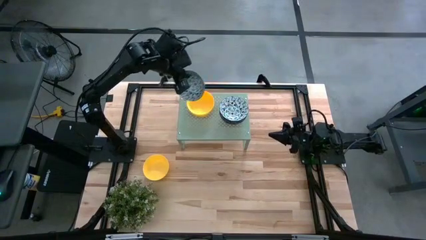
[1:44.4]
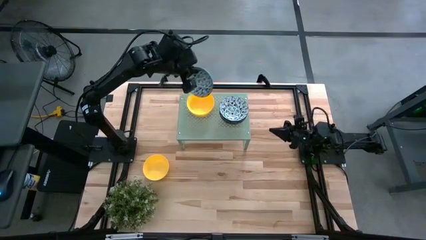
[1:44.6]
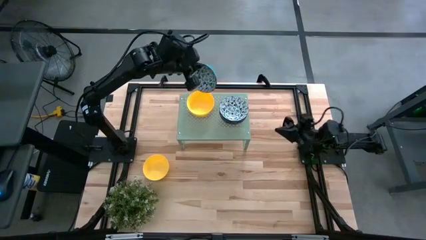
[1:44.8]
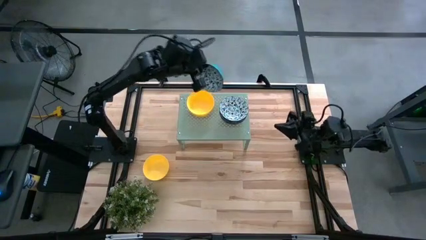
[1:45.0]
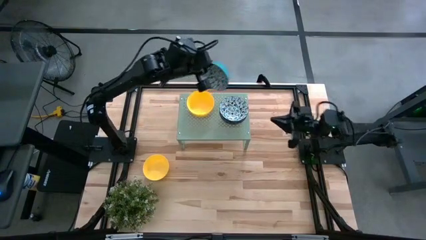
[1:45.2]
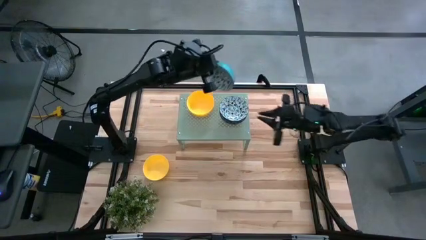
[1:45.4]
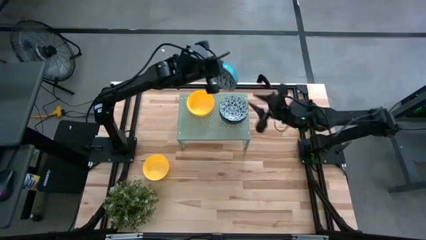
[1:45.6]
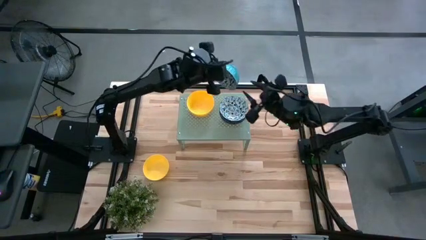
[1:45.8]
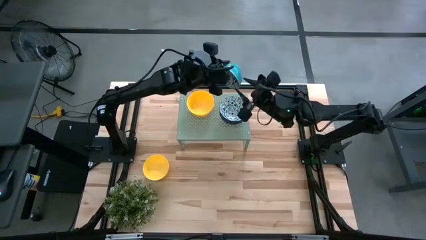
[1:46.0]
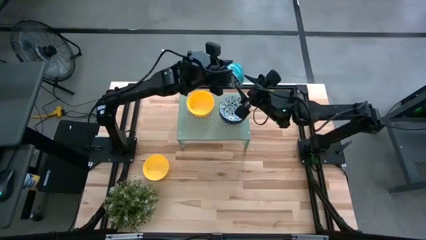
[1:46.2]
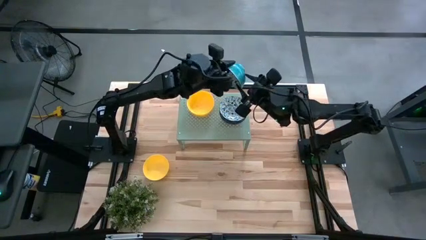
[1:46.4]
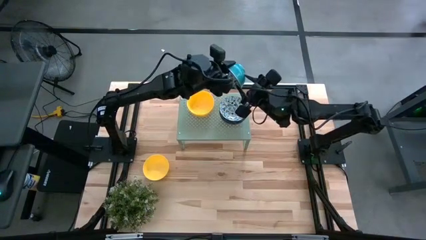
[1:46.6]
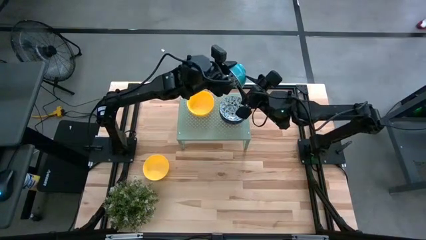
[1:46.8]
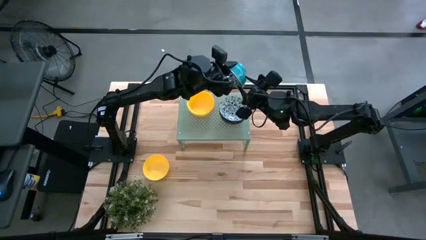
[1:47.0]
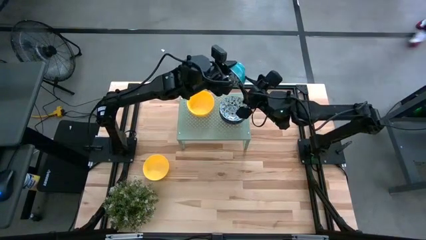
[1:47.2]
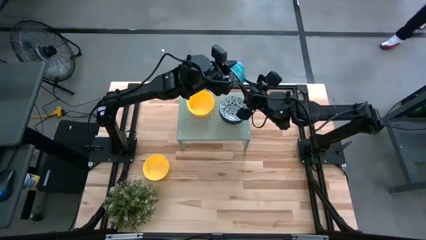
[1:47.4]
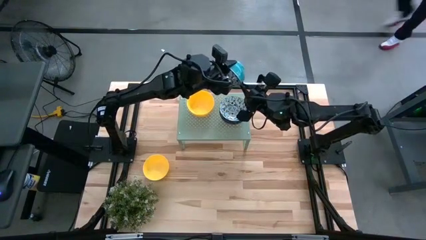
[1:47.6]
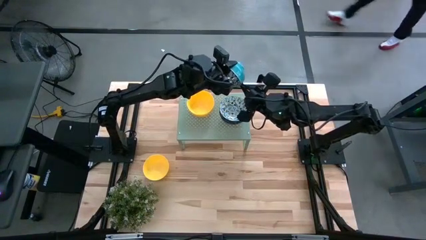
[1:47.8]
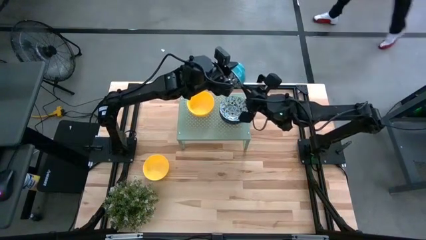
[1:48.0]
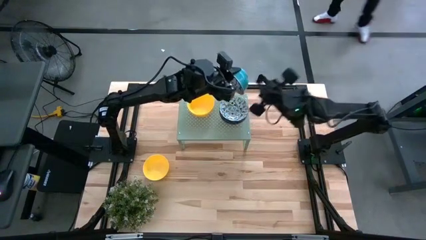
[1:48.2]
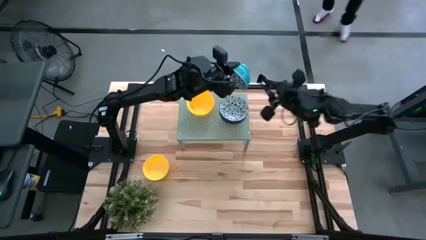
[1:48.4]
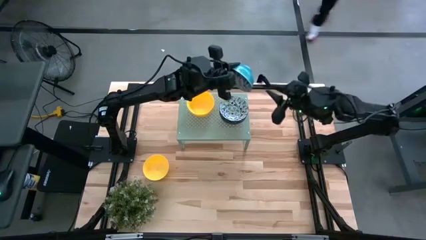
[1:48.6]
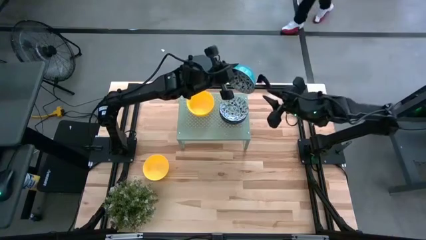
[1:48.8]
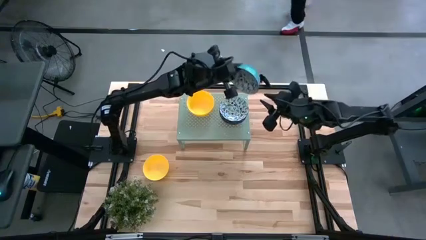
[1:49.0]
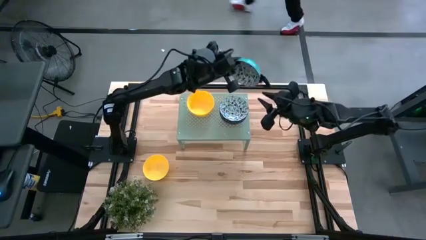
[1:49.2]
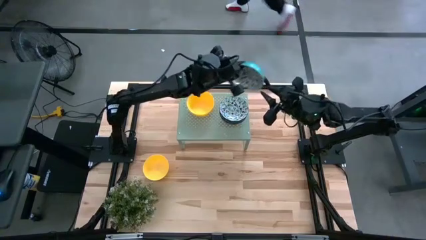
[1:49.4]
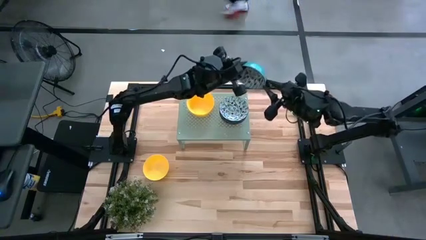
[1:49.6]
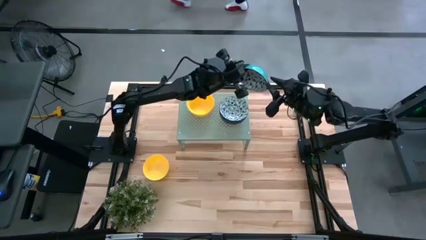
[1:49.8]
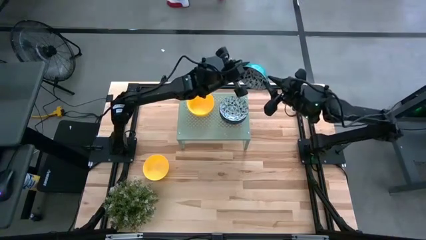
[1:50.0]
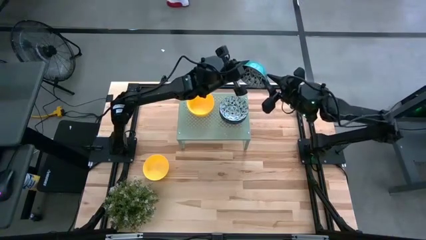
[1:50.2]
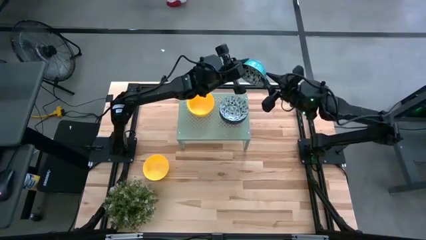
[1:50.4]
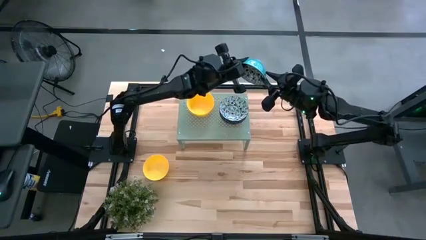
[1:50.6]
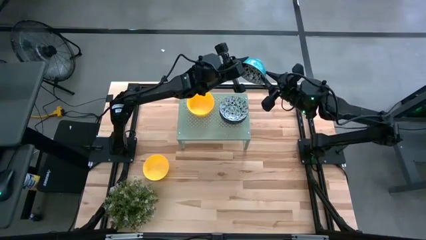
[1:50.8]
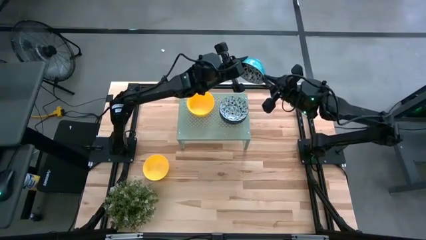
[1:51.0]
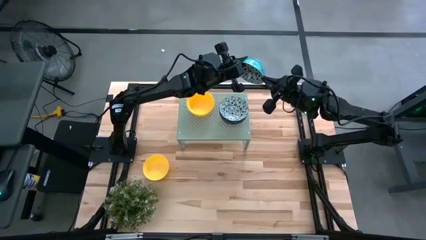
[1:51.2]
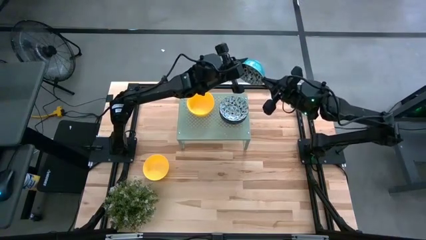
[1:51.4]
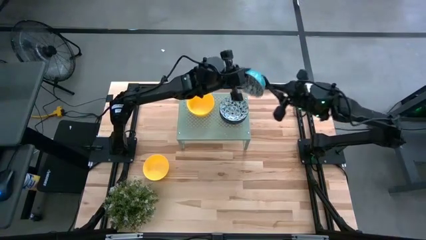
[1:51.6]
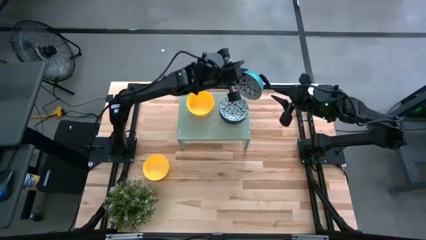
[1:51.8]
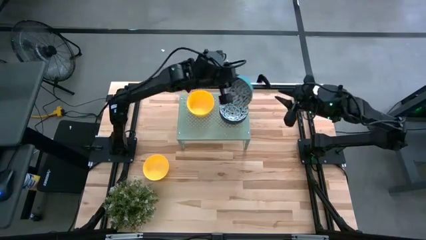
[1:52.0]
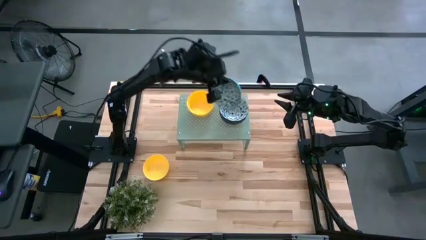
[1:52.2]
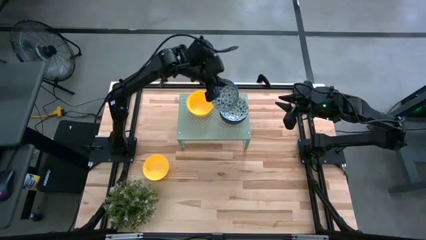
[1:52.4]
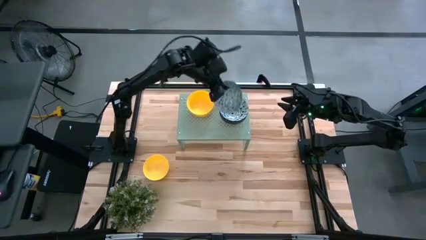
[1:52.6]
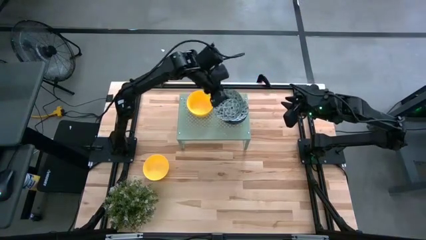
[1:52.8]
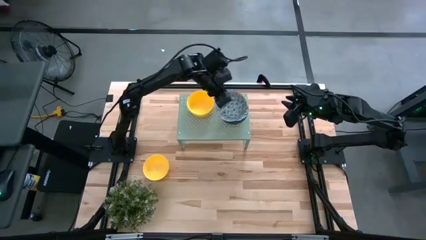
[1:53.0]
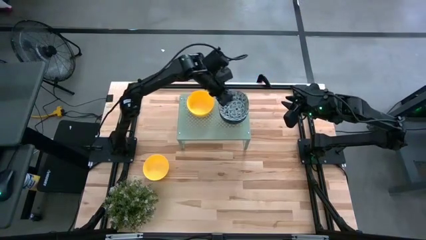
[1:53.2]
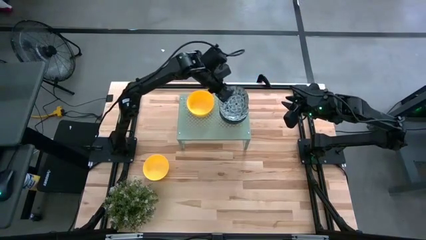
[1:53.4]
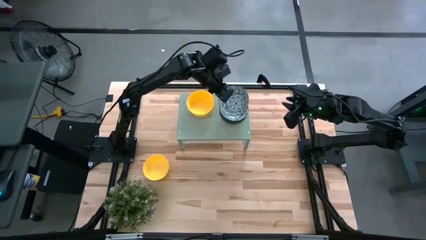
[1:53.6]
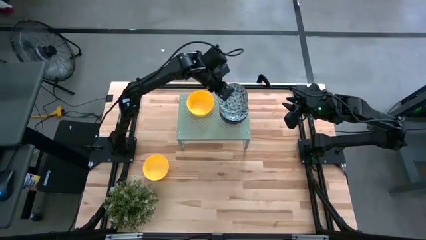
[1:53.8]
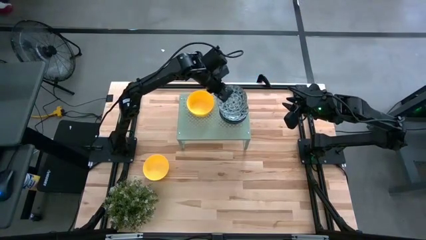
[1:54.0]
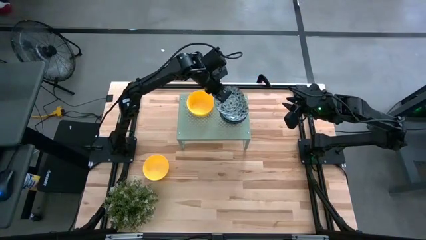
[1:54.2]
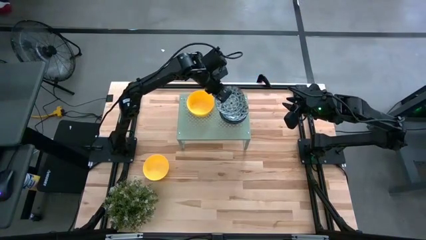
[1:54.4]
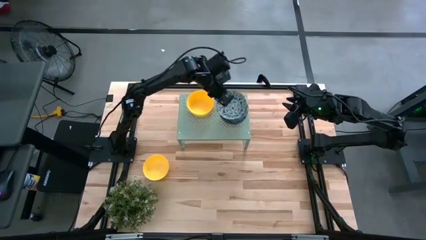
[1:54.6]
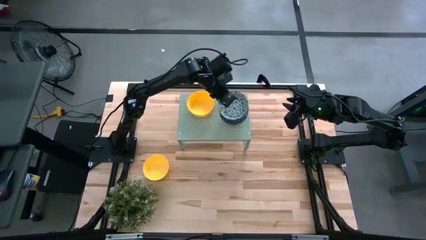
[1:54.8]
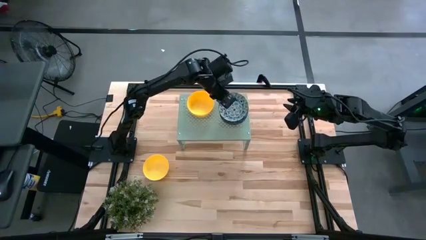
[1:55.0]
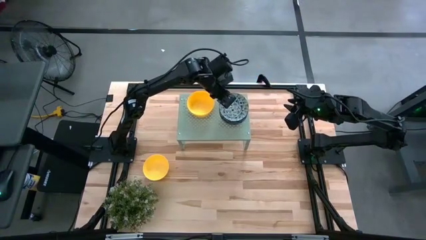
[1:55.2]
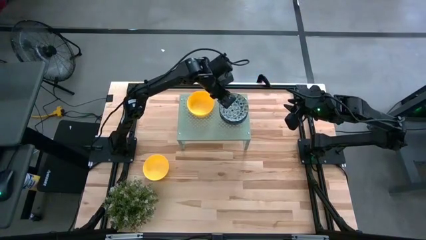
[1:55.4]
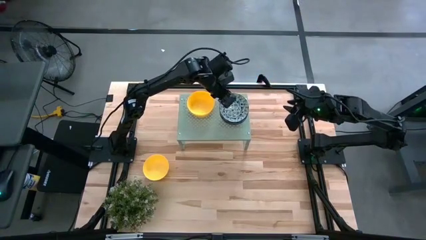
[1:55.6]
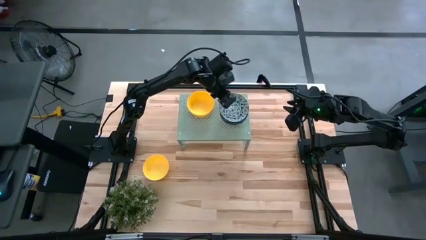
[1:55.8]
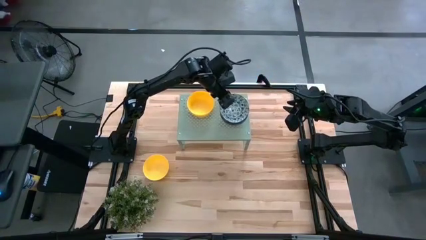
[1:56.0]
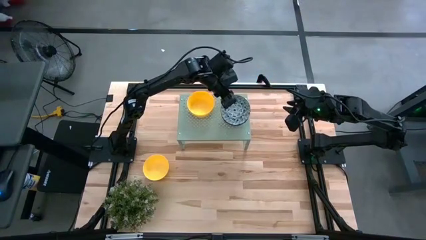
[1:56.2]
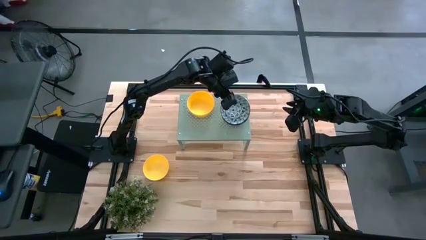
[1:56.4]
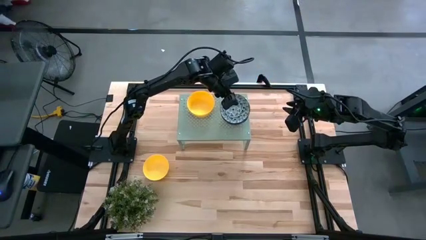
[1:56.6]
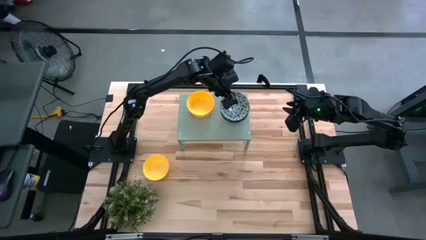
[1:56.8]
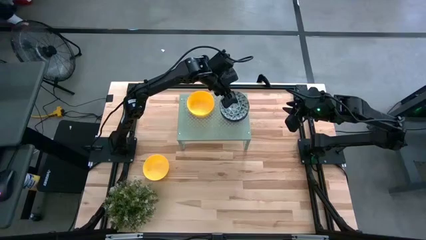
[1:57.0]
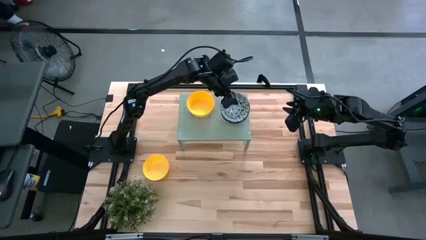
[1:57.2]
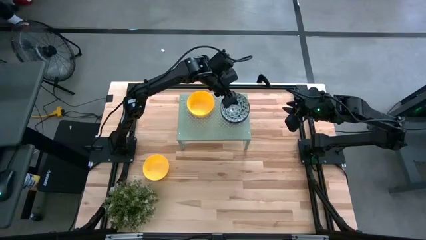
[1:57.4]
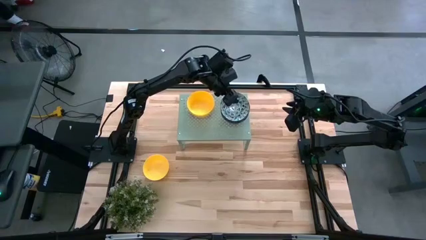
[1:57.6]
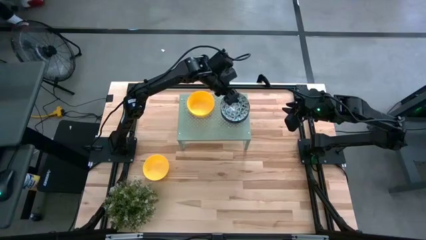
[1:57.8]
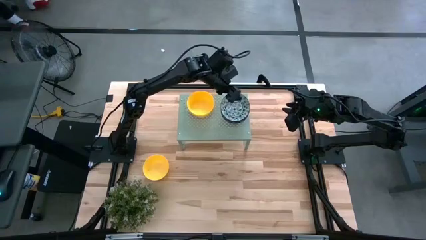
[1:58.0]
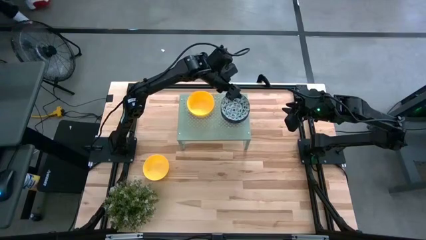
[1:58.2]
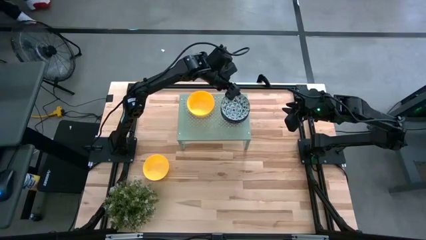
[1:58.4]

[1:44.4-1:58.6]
Task: Pick & Place Mini bowls
Stack the blue bowl on top of the blue bowls on the shelf
